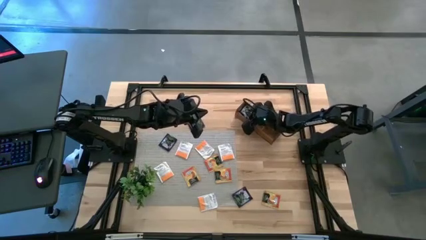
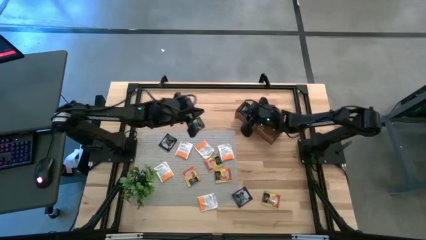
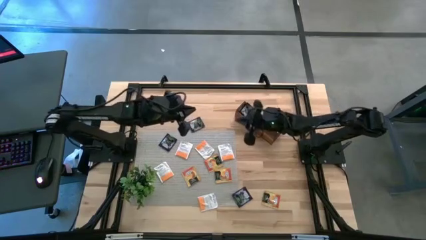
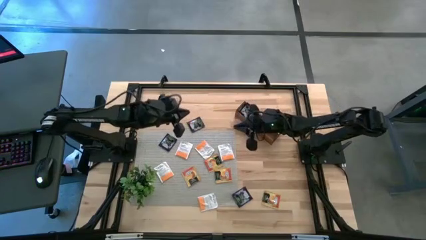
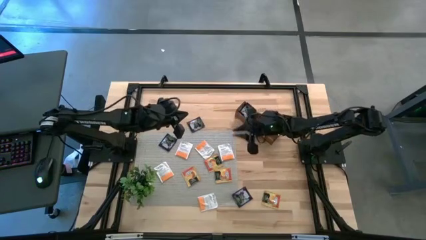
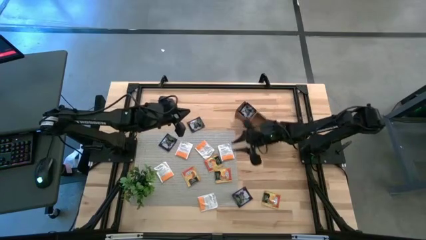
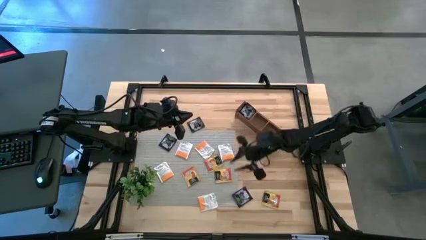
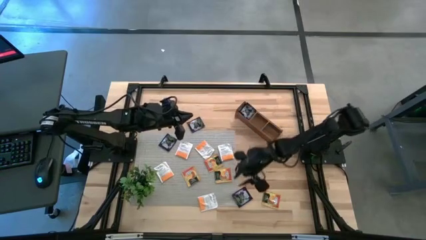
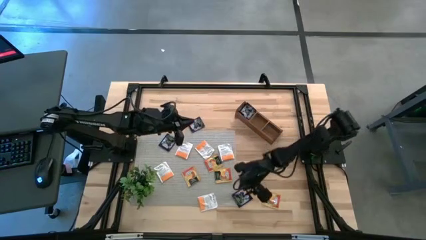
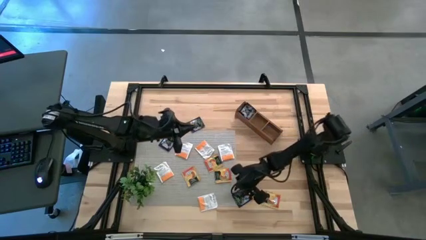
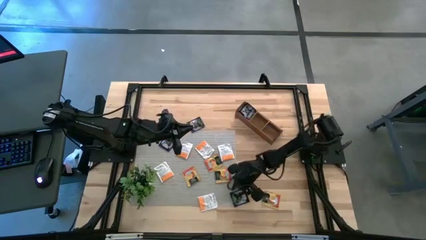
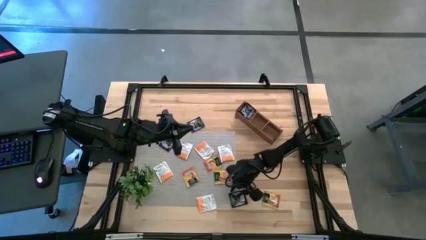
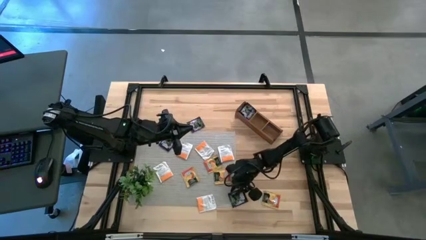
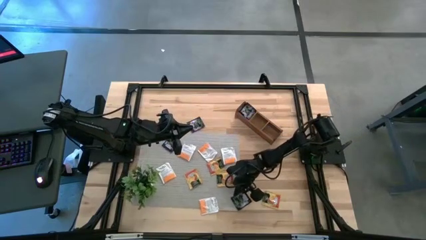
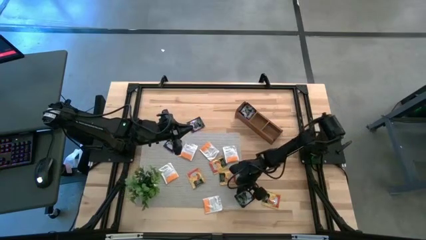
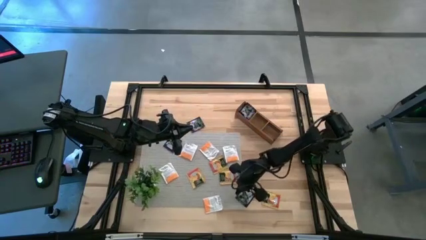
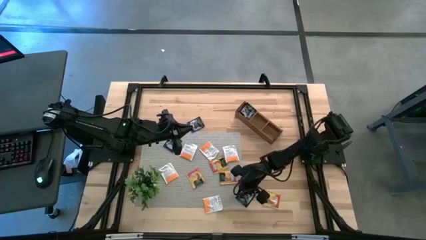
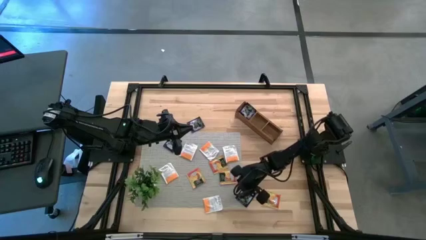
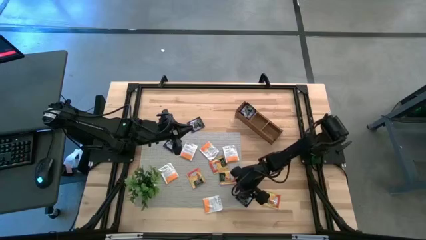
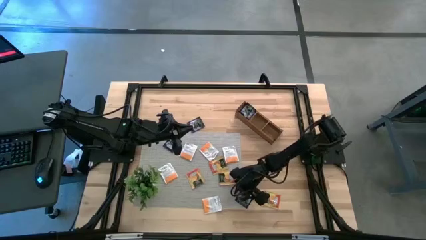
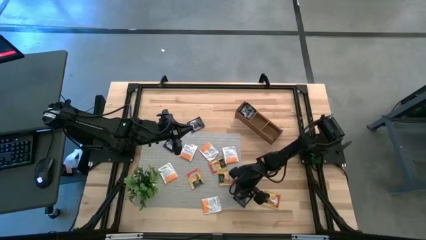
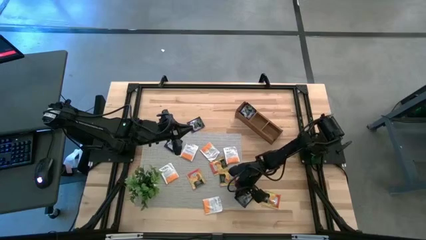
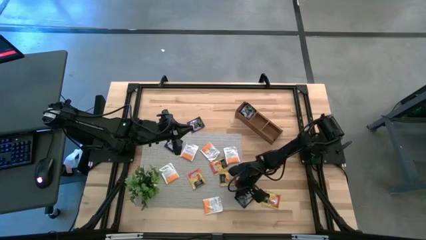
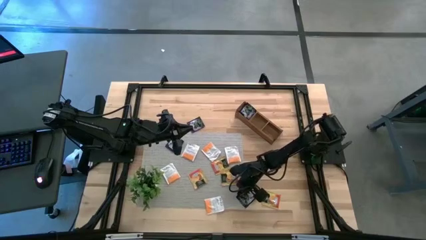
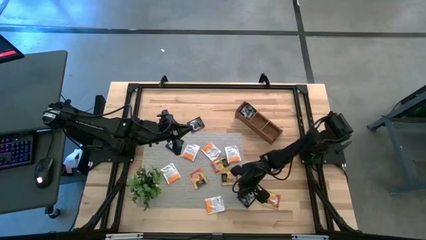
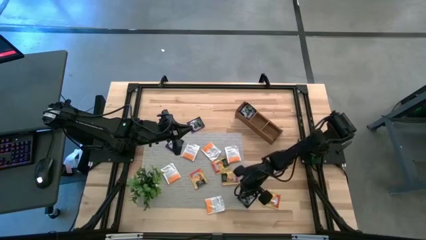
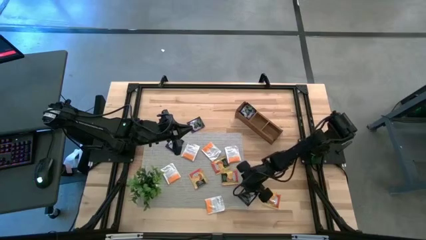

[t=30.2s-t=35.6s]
Task: Pick & Place Tea
Put the black tea bag into the left section of the wooden organizer

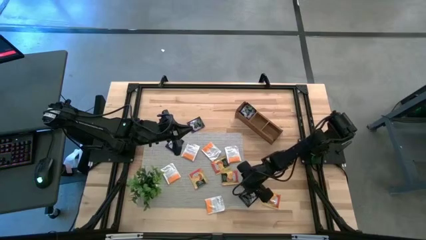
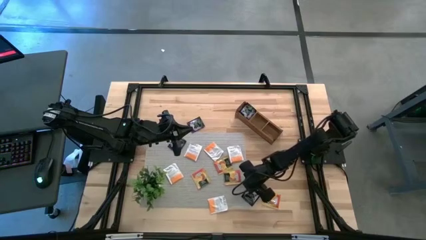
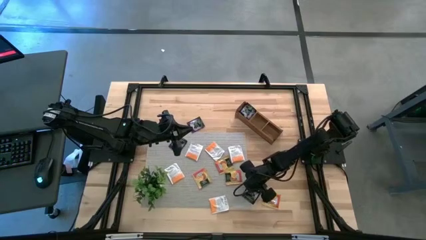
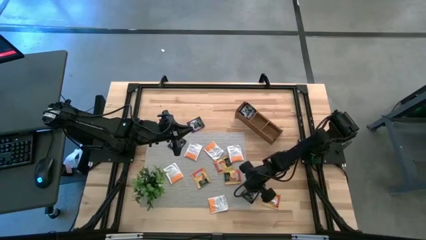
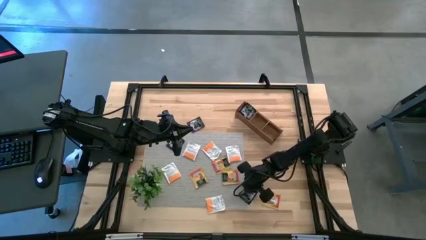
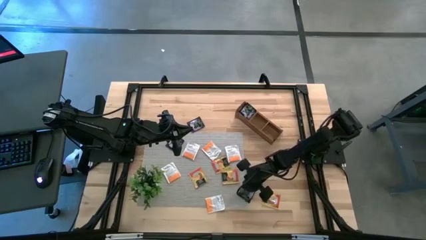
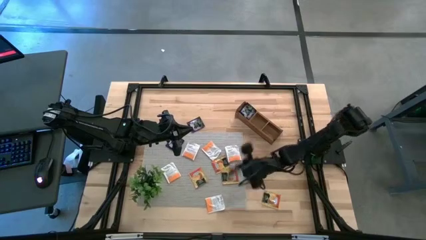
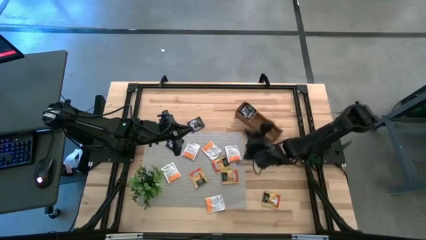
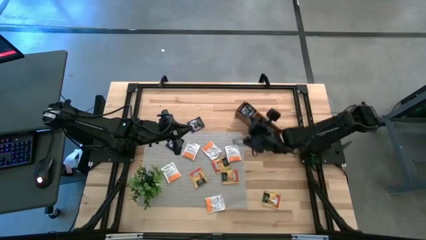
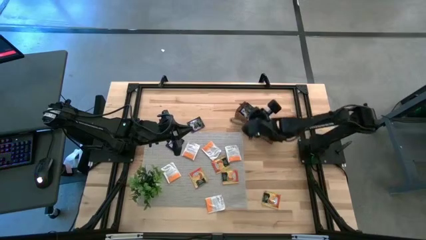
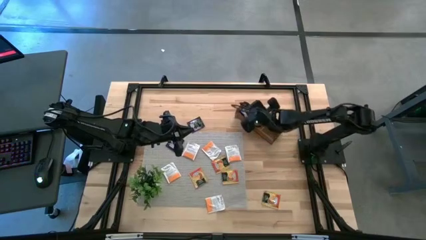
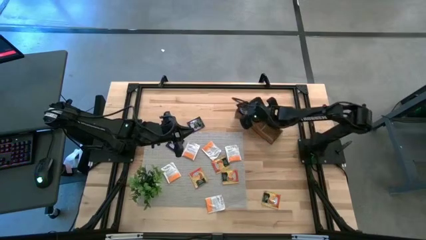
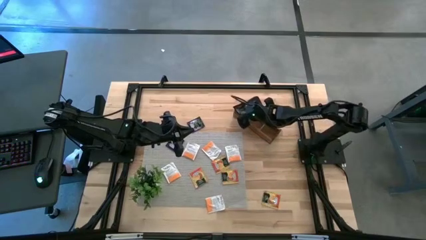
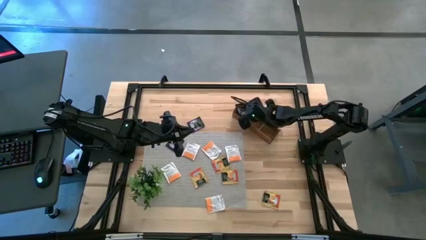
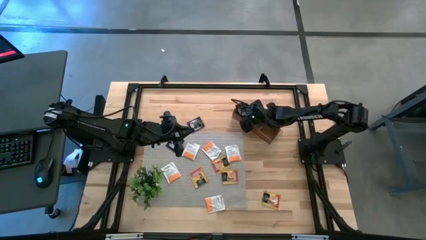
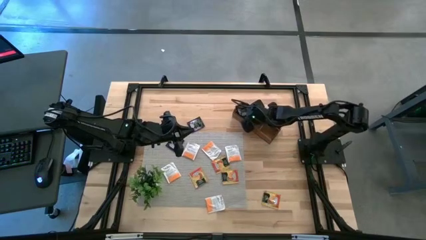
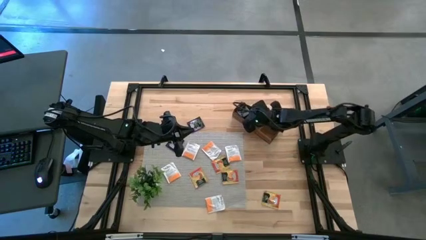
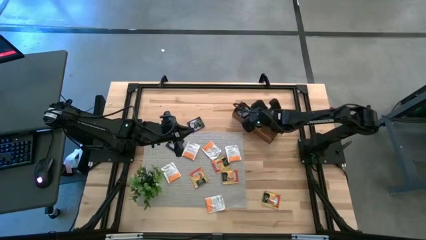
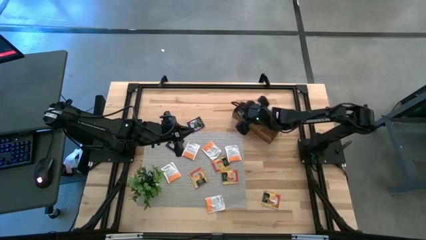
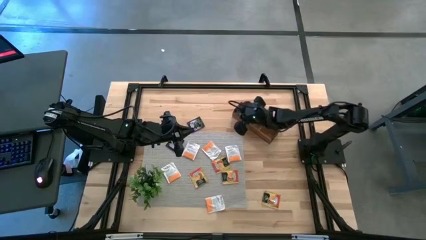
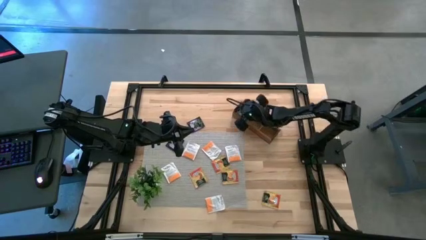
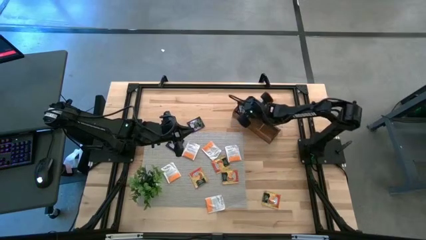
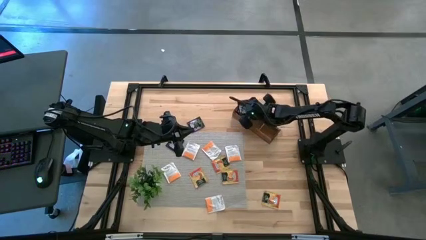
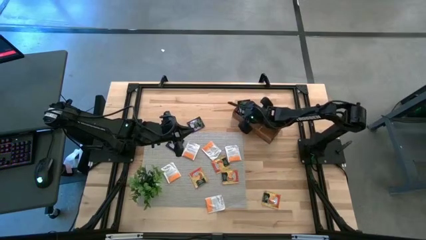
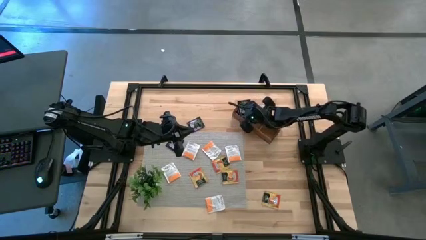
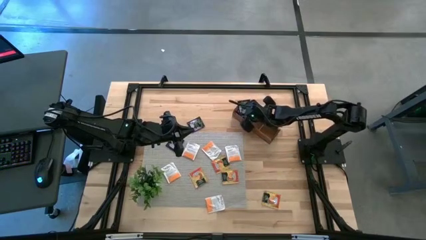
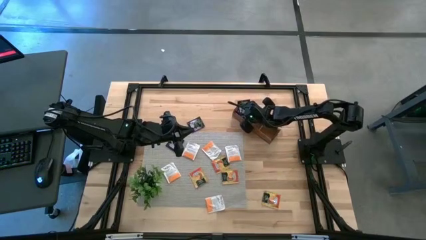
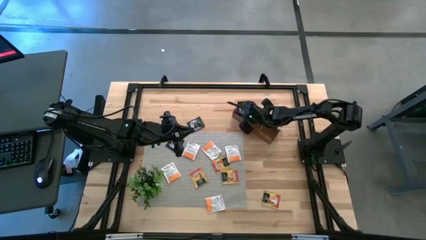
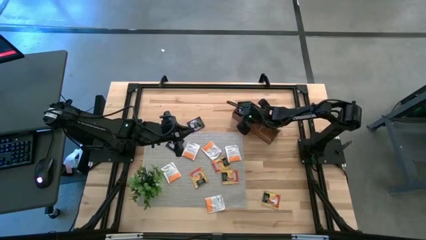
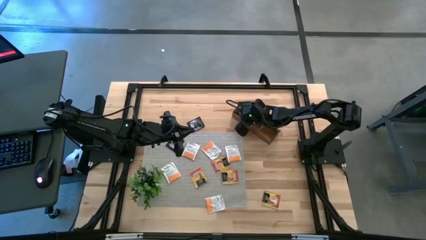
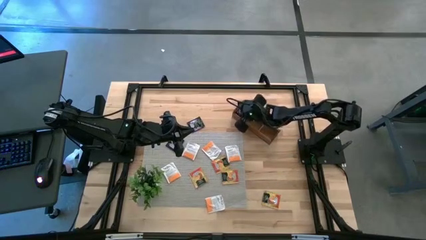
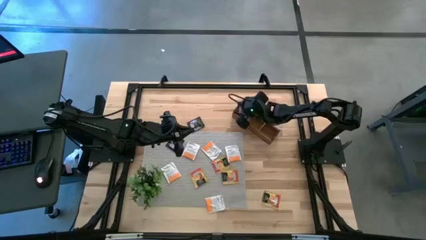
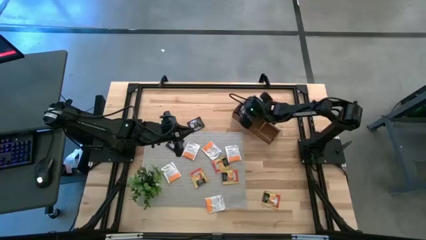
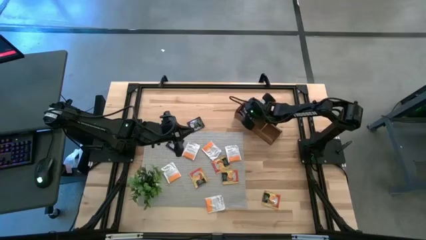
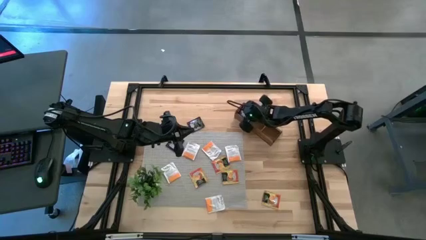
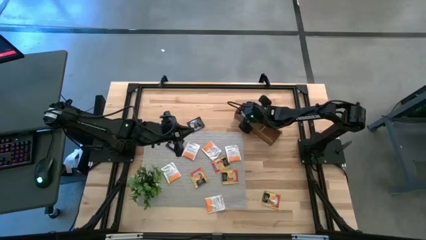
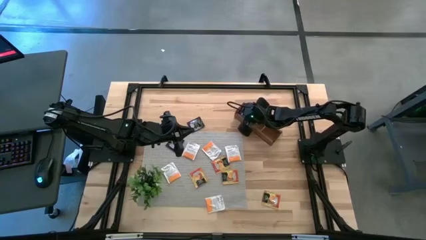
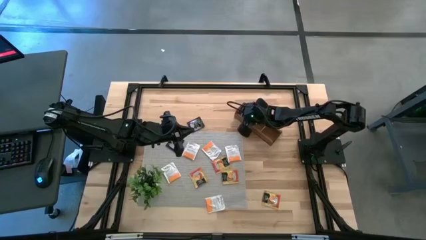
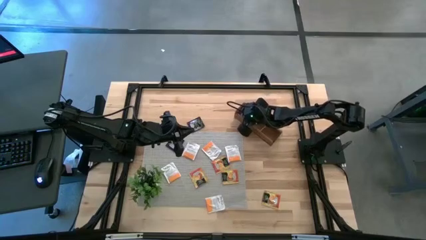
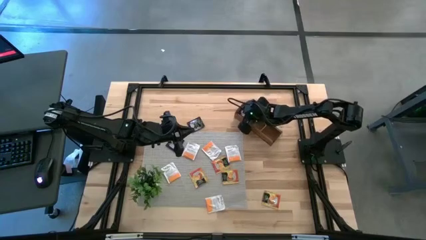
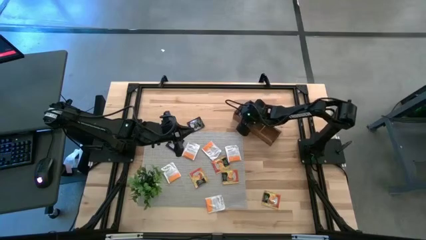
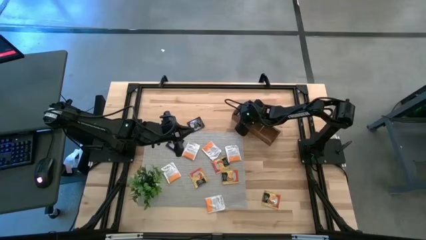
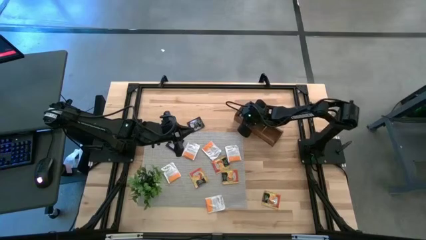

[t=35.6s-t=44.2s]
Put the black tea bag into the left section of the wooden organizer
